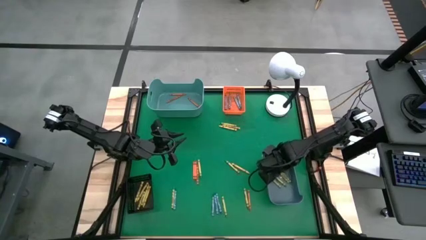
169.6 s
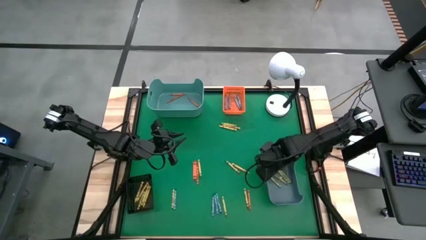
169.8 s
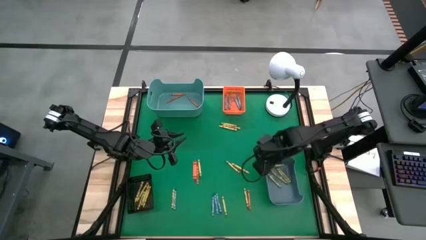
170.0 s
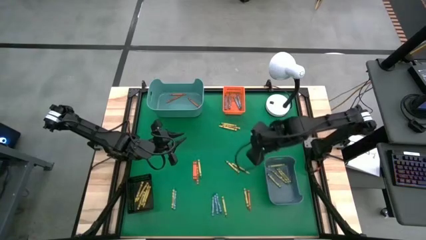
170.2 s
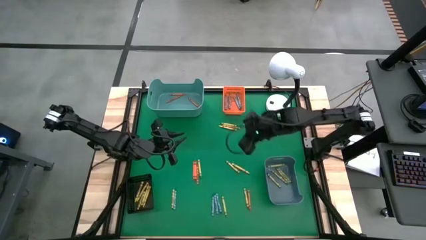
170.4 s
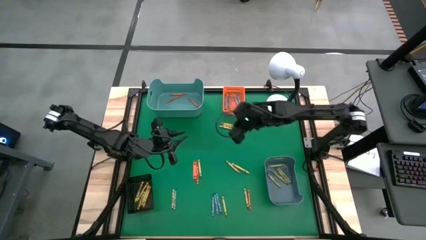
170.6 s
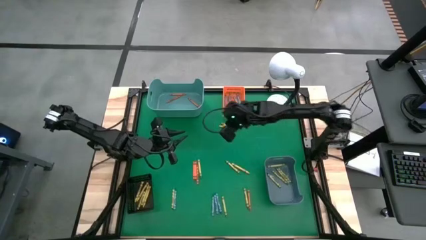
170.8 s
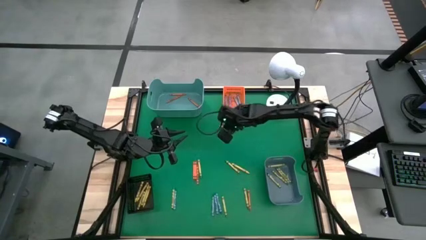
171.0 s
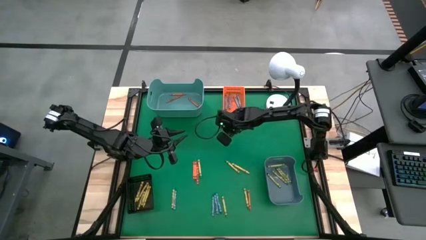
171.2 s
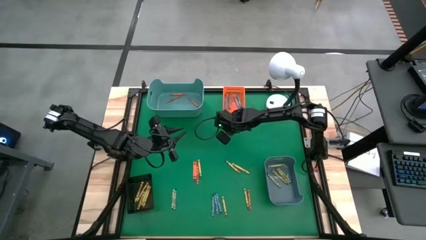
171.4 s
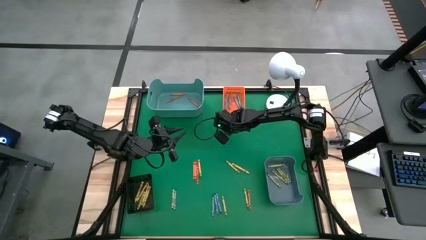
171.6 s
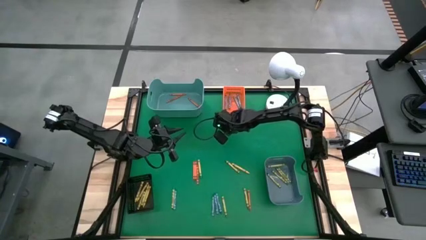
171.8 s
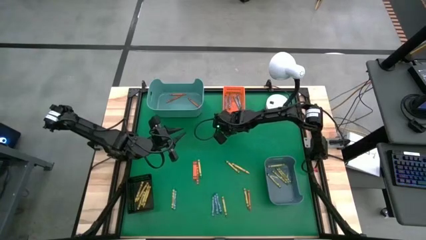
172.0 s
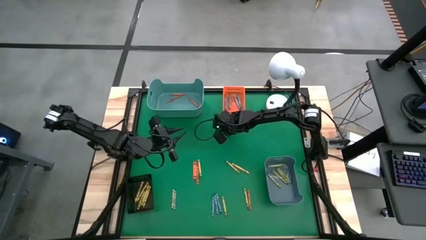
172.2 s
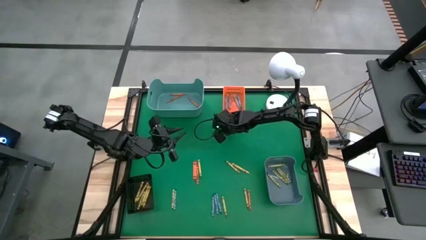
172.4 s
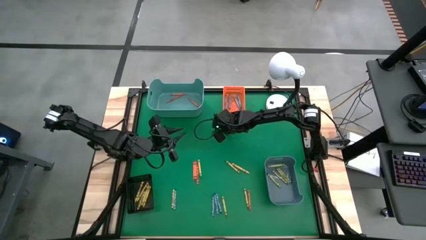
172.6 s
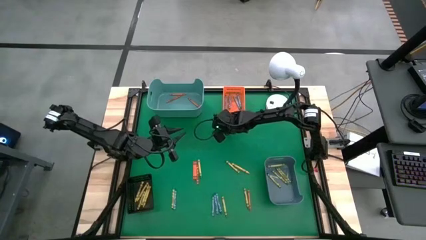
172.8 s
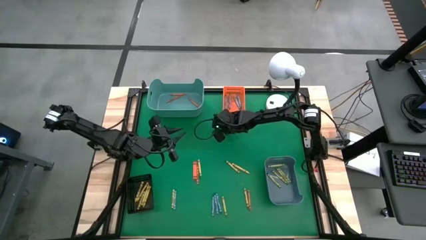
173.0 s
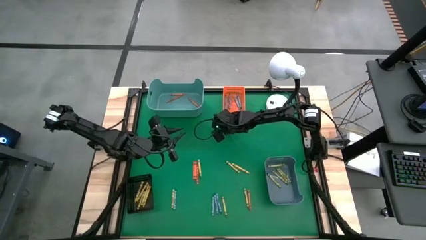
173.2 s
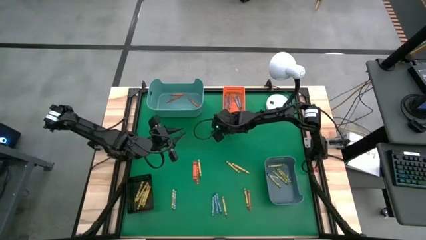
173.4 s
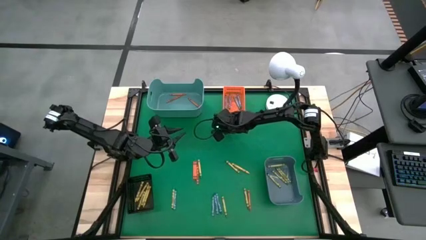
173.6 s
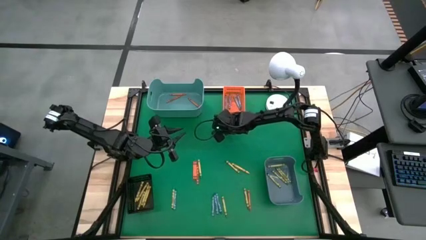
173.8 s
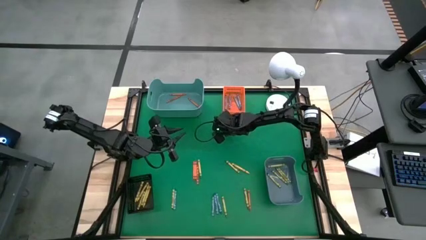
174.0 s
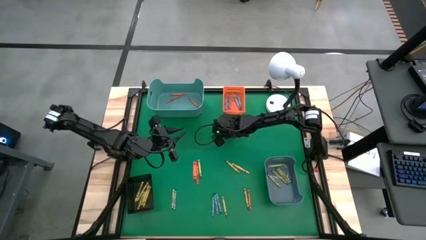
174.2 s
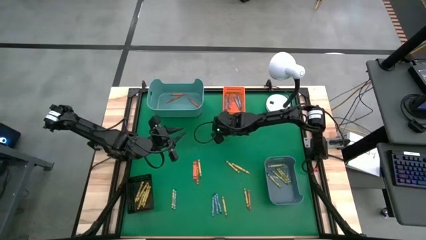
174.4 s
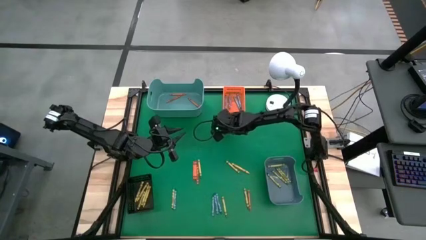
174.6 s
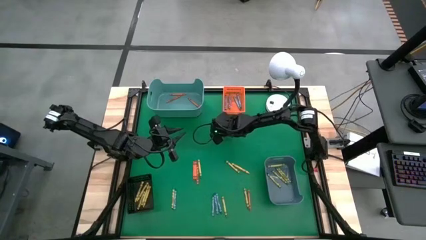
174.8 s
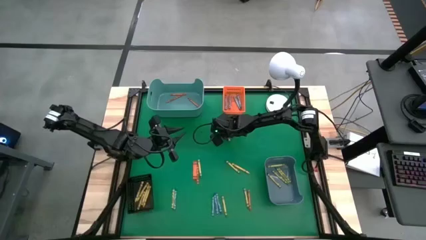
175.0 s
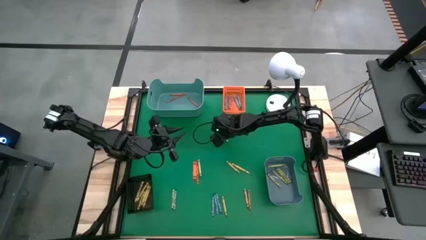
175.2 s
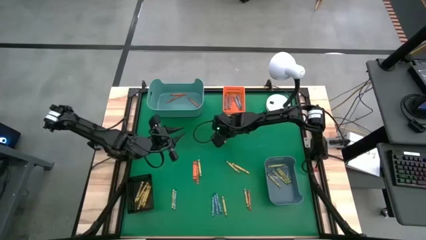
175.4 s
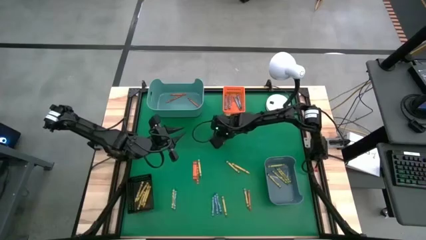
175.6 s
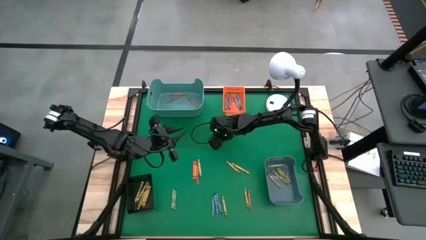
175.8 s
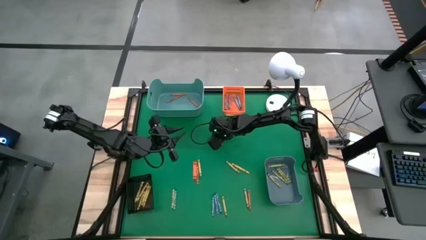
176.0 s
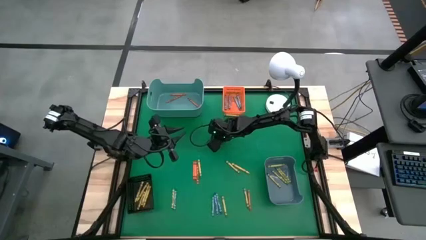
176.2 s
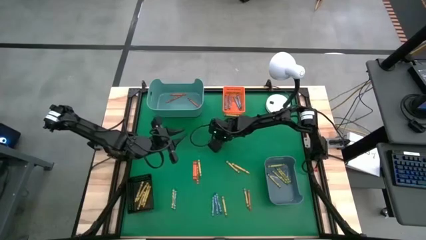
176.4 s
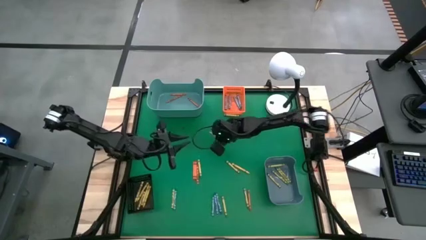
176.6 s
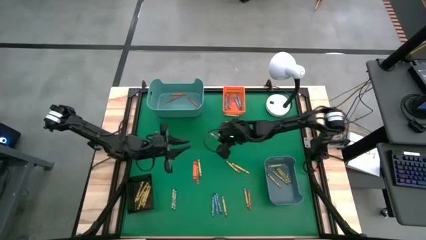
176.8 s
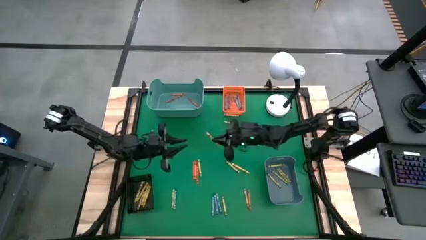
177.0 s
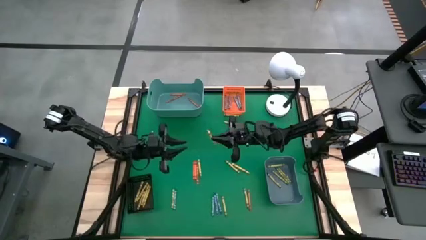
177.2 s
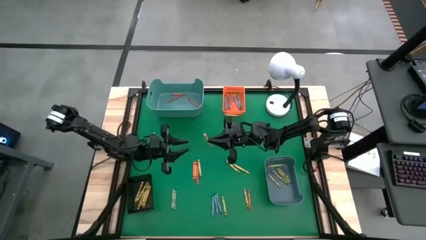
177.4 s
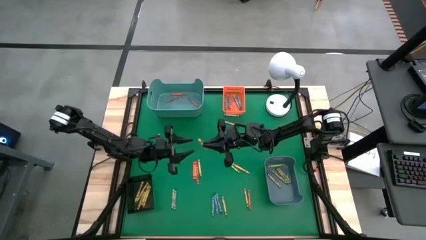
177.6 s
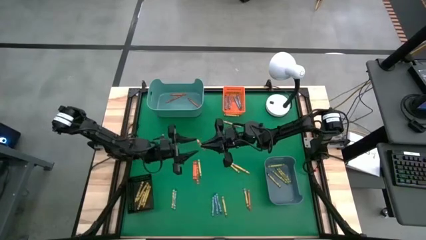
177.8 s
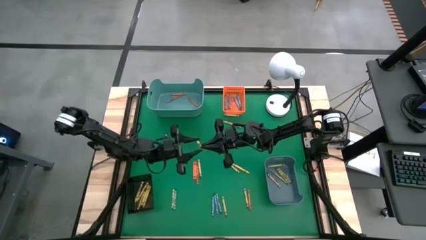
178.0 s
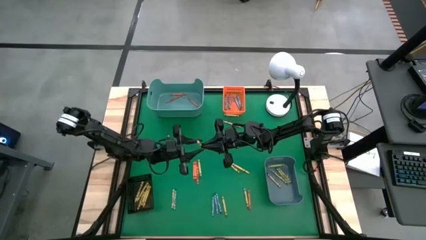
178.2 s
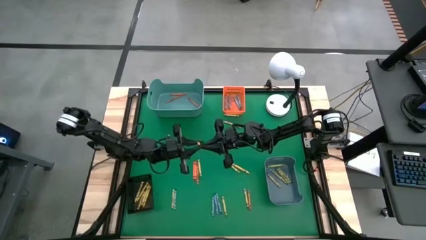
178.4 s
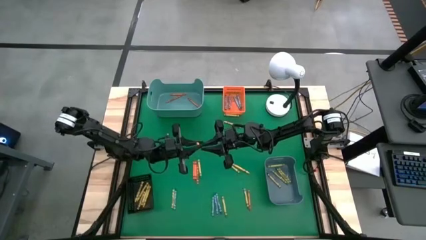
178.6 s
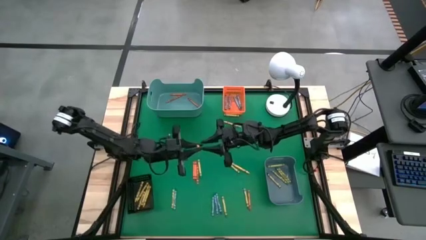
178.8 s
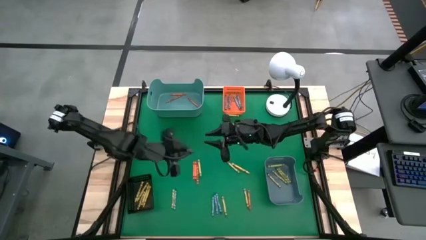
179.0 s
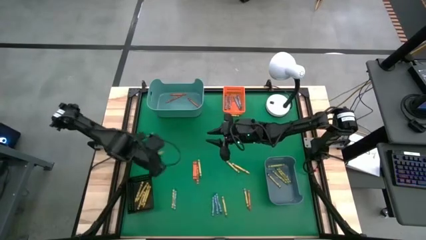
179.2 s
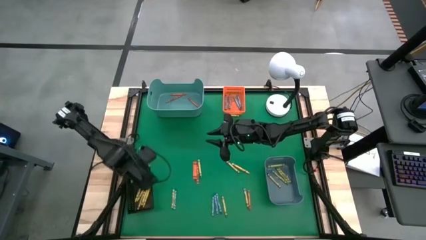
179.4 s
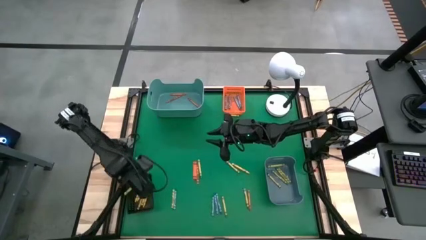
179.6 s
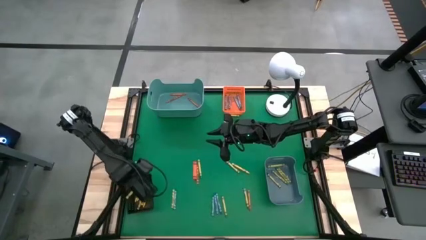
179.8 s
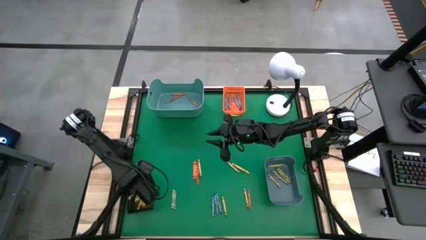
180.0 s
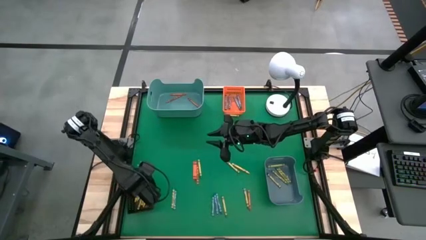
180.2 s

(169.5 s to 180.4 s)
Task: Sort crayons
Put the yellow crayon into the black bin

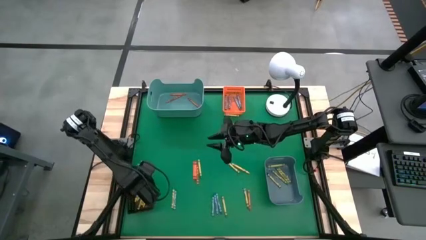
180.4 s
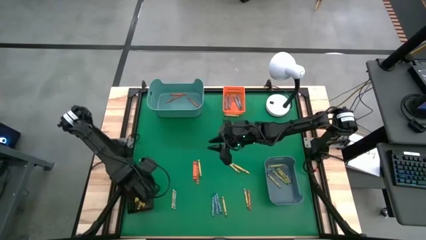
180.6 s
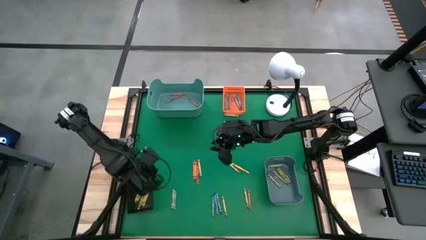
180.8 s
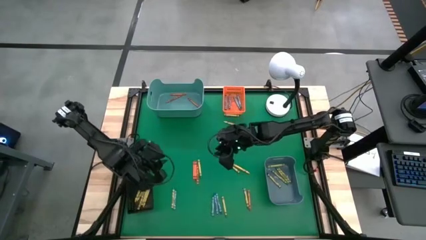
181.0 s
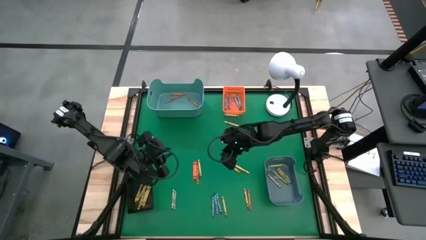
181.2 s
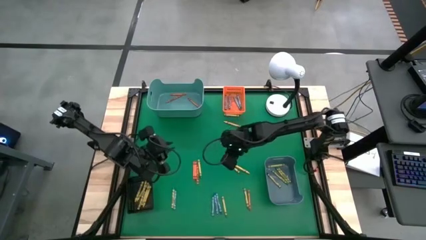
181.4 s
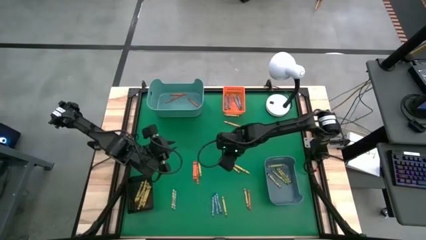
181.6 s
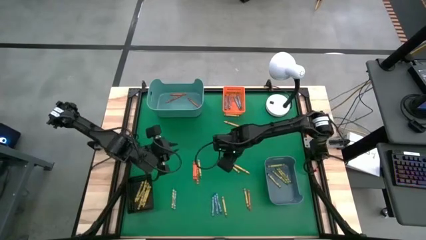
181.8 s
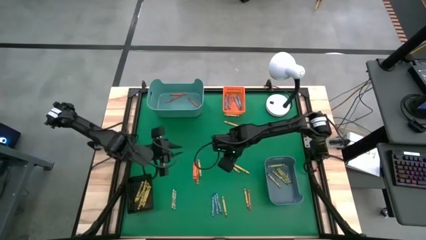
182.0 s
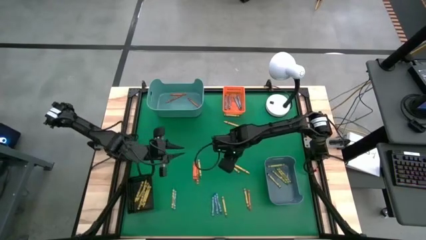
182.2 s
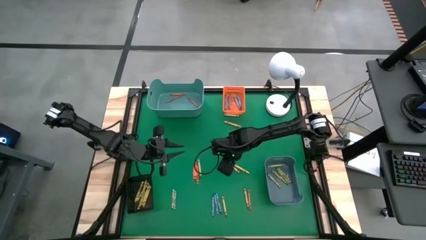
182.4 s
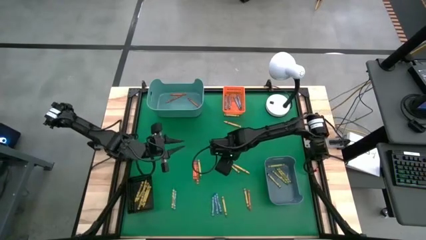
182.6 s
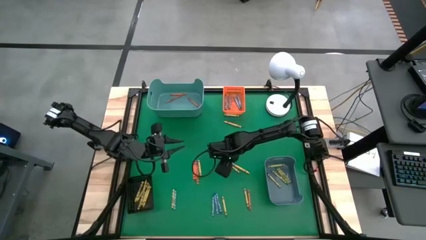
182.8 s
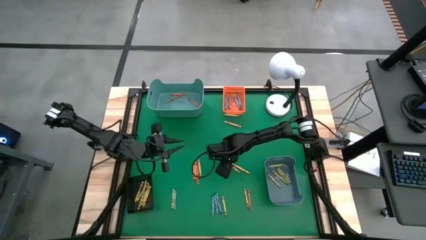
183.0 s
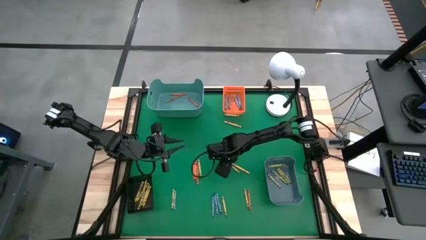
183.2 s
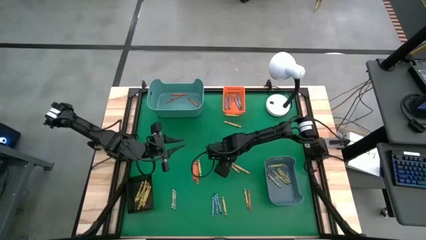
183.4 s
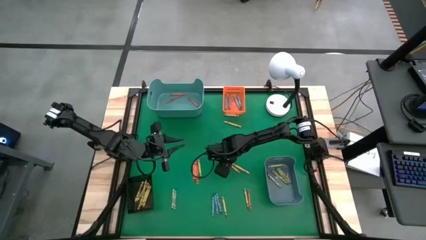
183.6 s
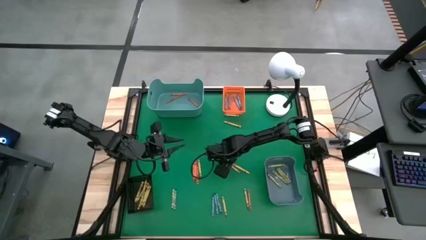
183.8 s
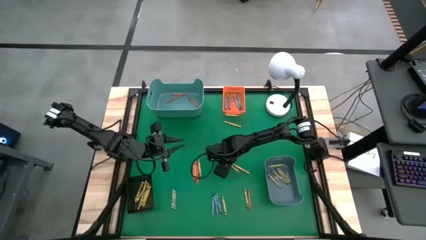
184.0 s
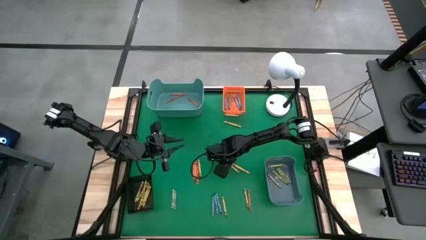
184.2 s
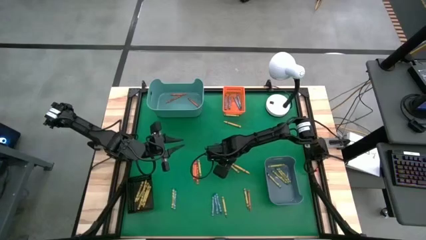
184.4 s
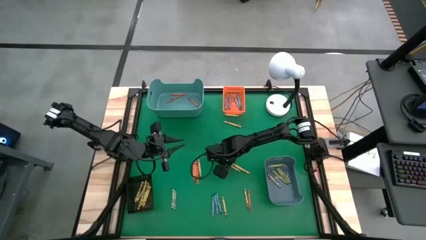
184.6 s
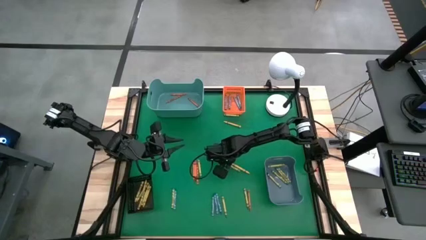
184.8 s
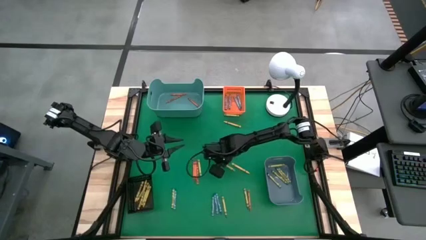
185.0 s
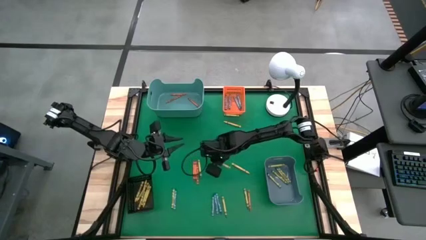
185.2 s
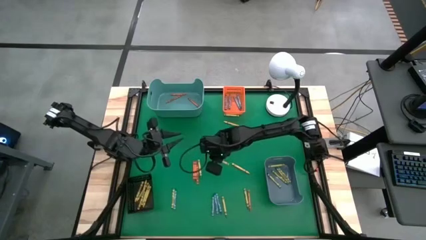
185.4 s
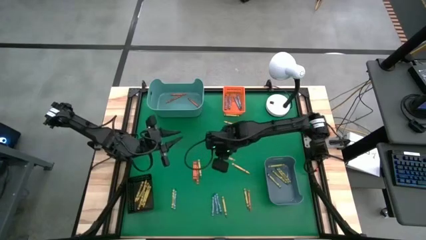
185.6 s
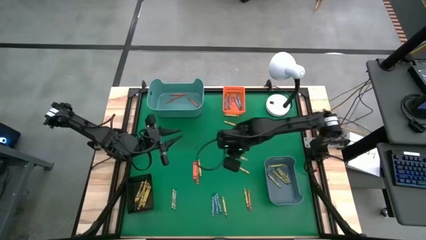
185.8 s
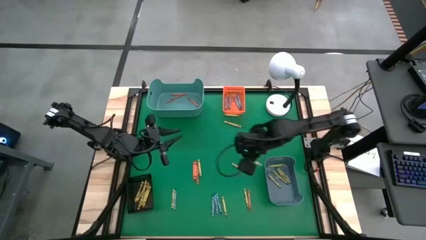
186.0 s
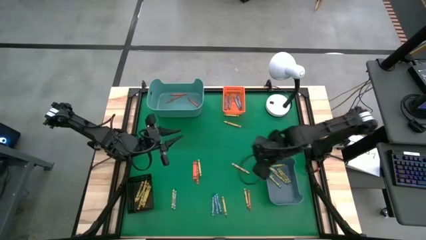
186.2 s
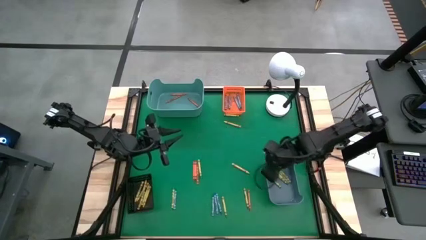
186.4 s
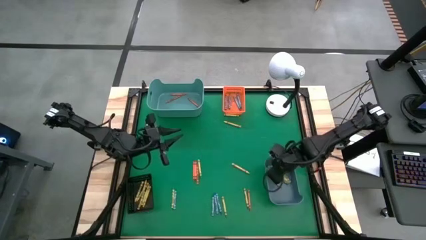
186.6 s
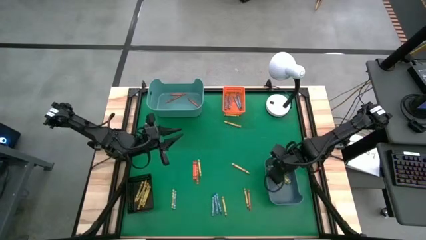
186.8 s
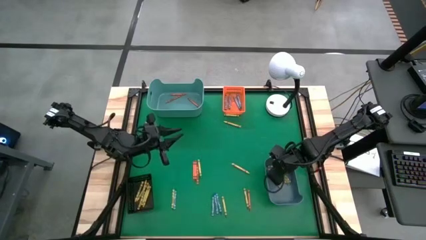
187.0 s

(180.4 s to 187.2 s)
Put the green crayon into the blue bin
